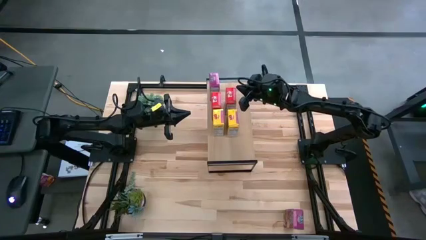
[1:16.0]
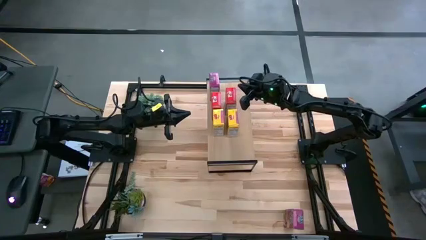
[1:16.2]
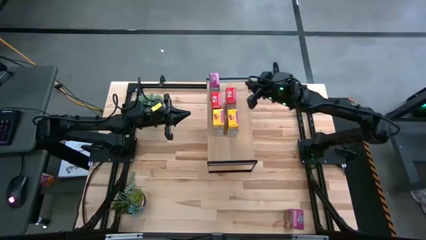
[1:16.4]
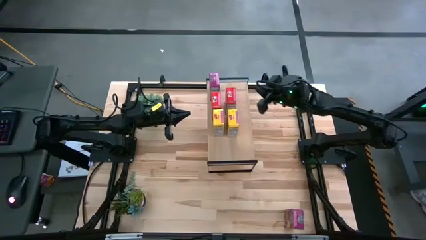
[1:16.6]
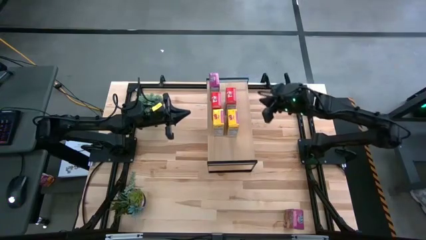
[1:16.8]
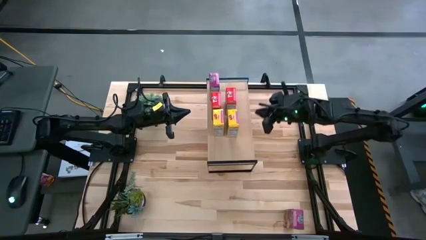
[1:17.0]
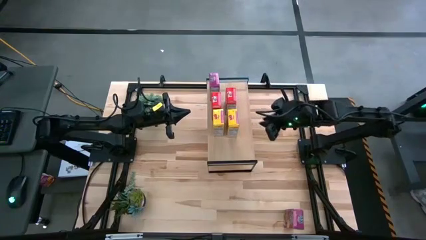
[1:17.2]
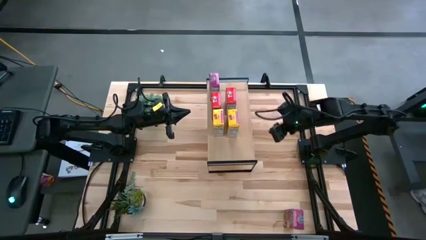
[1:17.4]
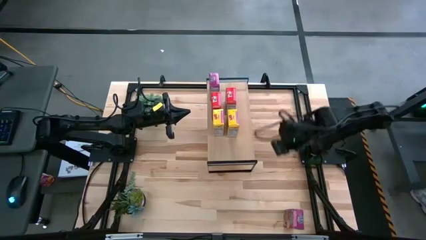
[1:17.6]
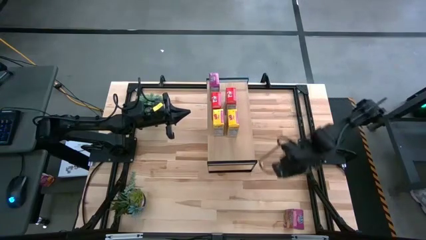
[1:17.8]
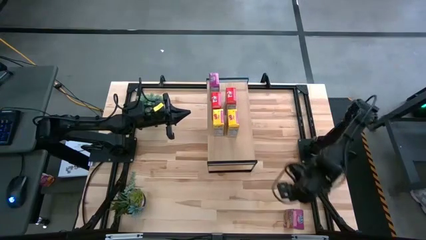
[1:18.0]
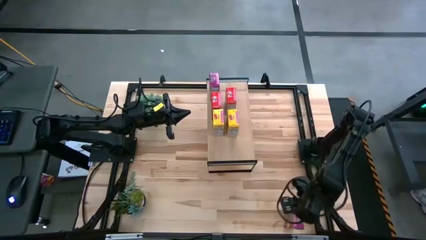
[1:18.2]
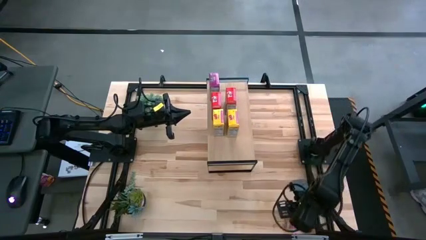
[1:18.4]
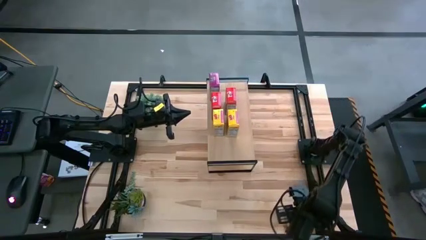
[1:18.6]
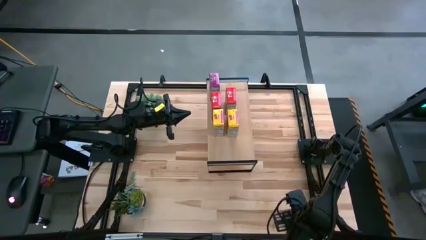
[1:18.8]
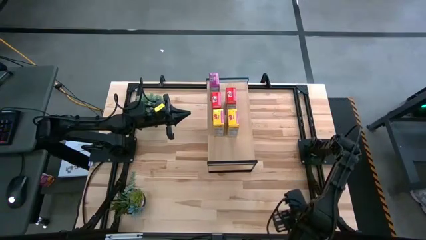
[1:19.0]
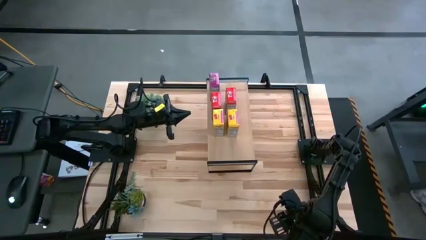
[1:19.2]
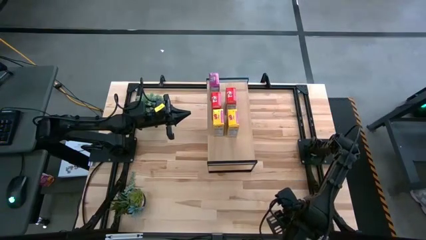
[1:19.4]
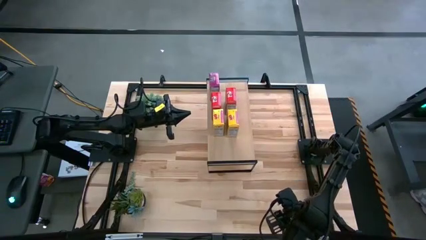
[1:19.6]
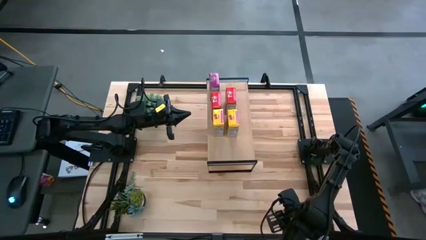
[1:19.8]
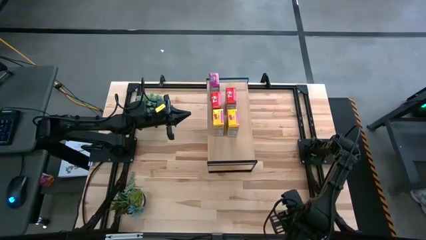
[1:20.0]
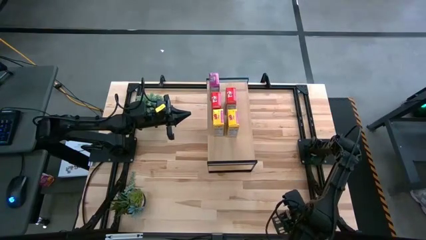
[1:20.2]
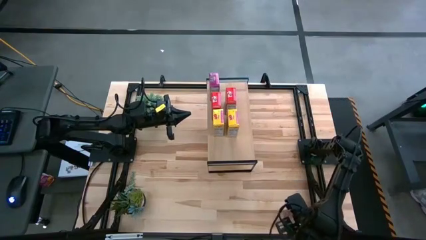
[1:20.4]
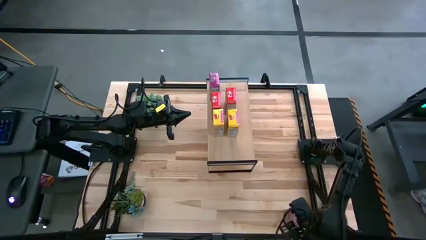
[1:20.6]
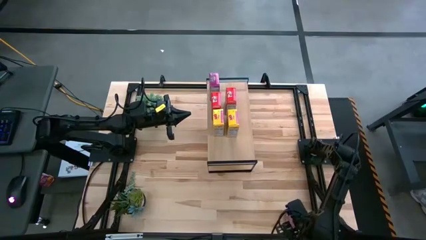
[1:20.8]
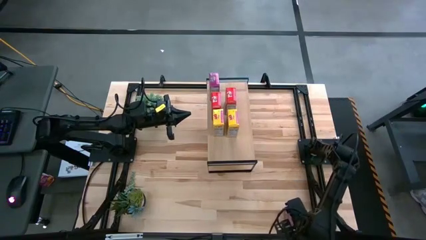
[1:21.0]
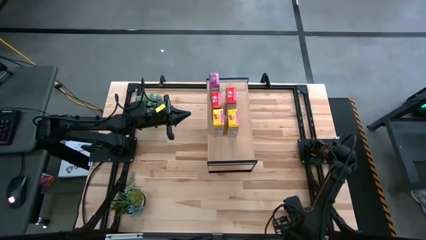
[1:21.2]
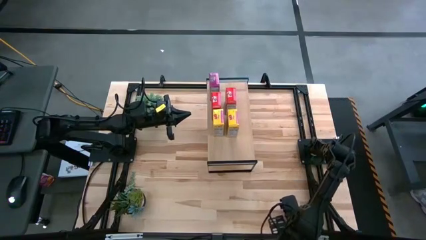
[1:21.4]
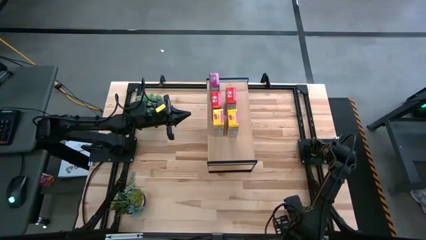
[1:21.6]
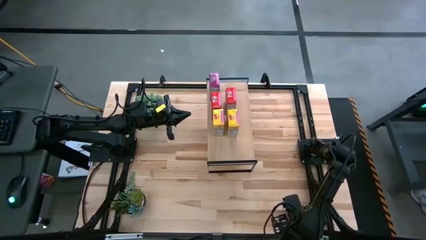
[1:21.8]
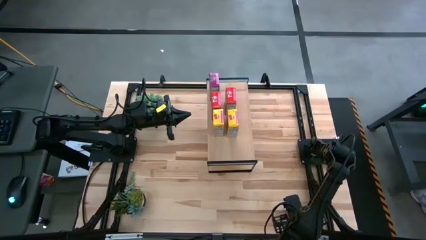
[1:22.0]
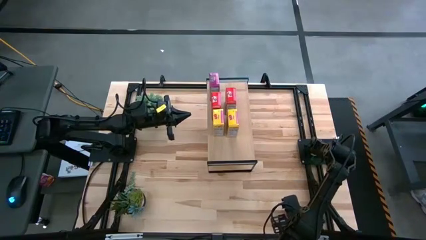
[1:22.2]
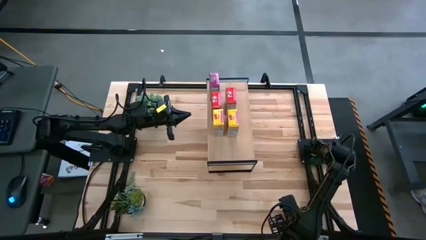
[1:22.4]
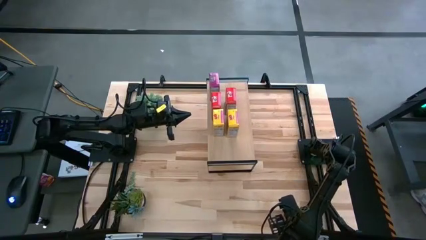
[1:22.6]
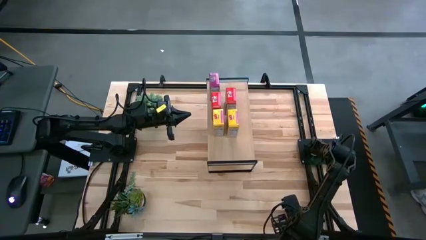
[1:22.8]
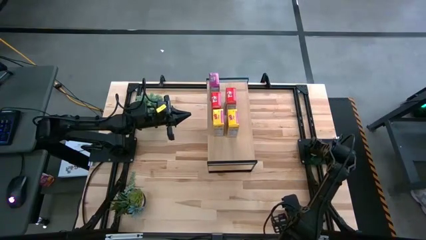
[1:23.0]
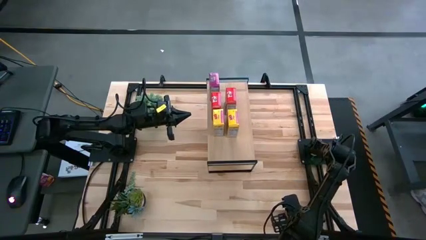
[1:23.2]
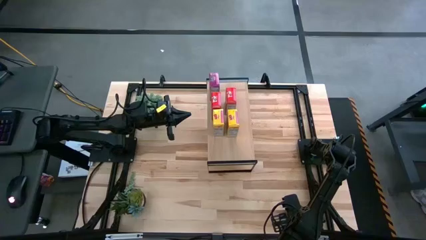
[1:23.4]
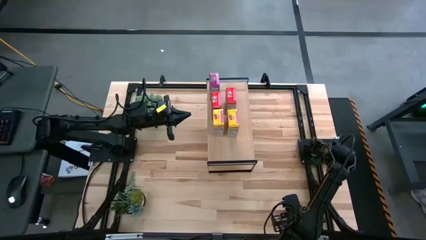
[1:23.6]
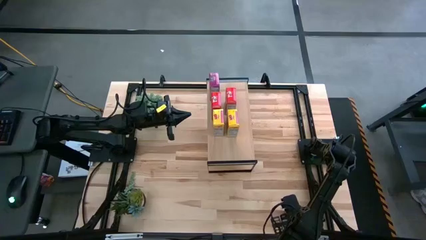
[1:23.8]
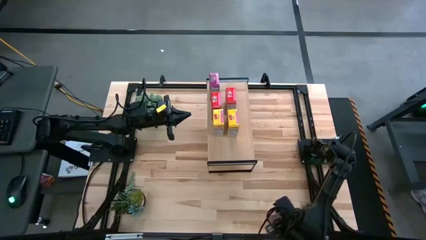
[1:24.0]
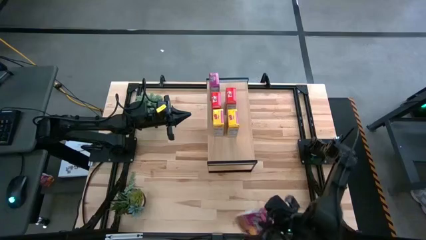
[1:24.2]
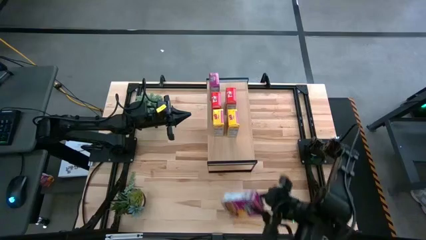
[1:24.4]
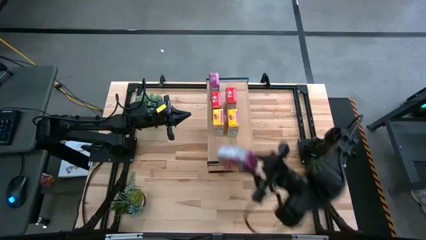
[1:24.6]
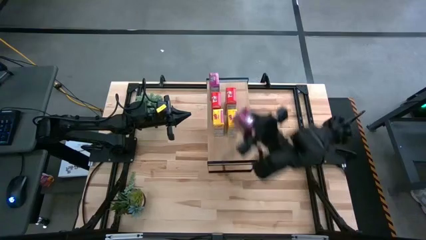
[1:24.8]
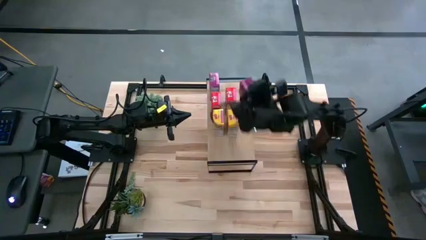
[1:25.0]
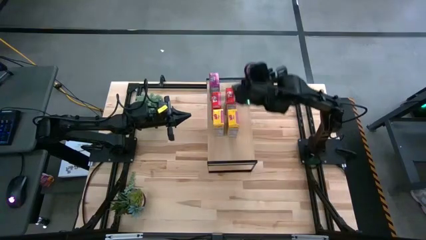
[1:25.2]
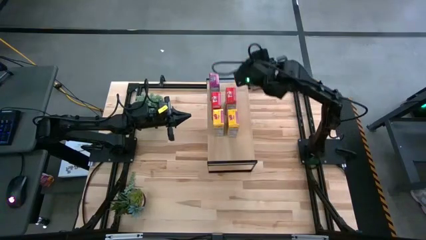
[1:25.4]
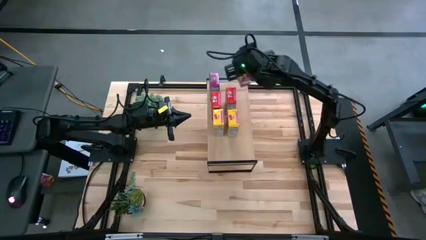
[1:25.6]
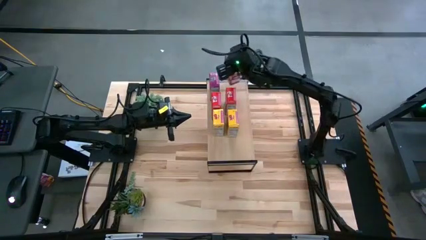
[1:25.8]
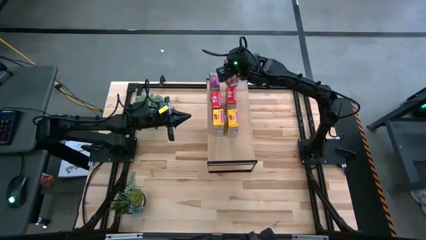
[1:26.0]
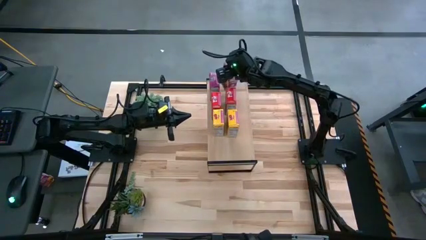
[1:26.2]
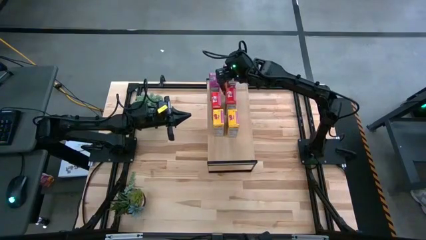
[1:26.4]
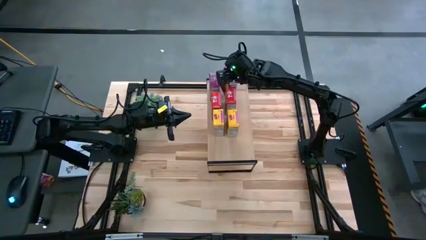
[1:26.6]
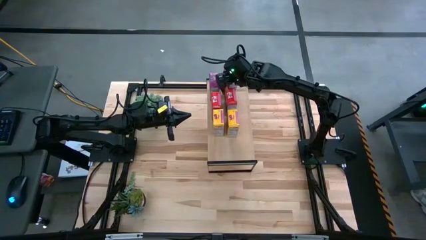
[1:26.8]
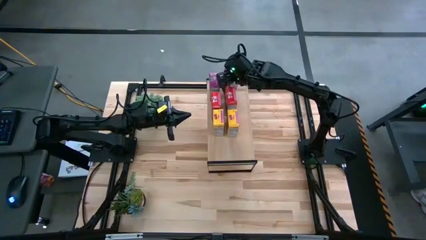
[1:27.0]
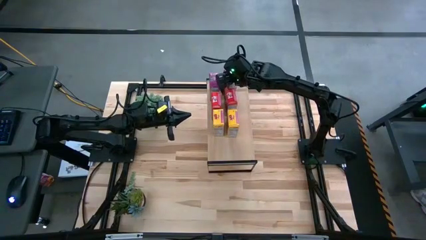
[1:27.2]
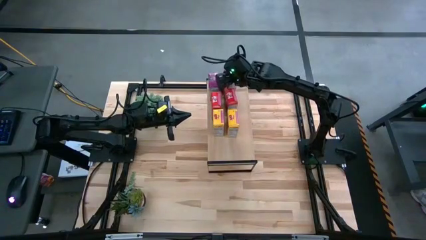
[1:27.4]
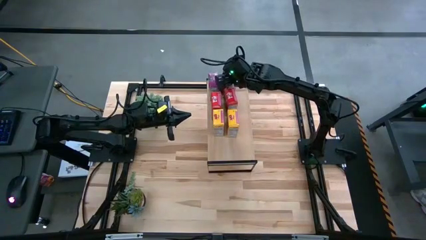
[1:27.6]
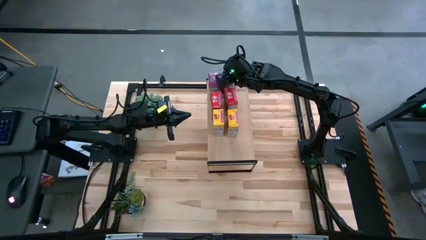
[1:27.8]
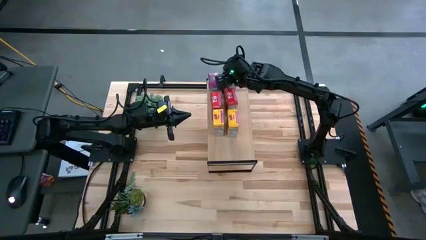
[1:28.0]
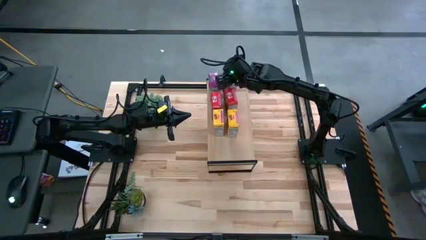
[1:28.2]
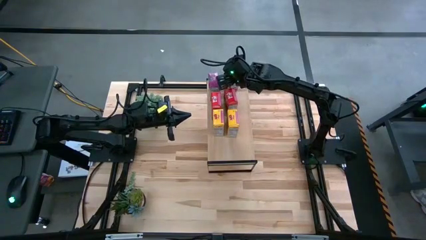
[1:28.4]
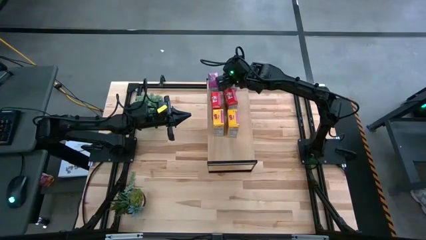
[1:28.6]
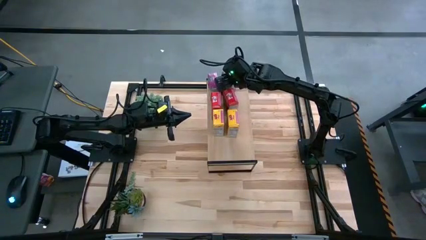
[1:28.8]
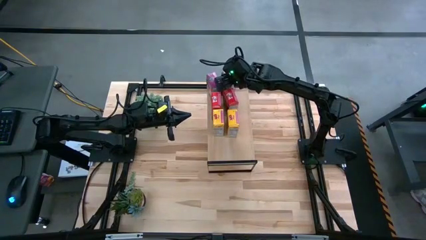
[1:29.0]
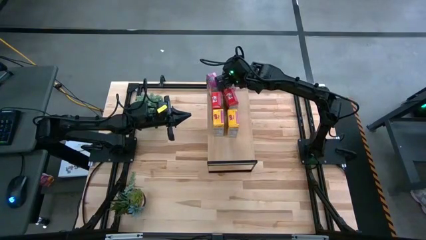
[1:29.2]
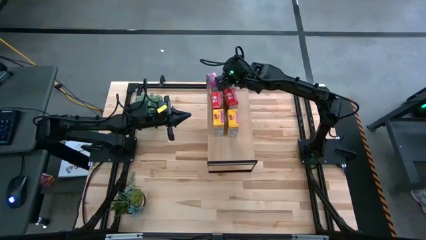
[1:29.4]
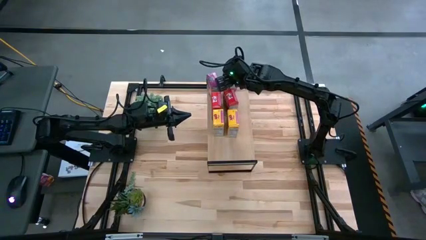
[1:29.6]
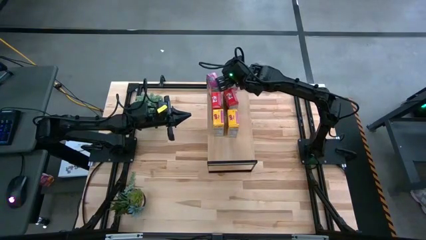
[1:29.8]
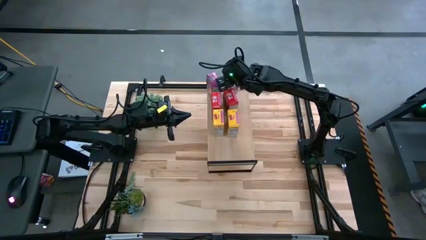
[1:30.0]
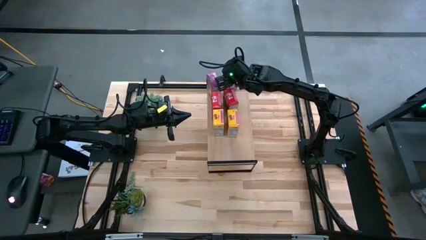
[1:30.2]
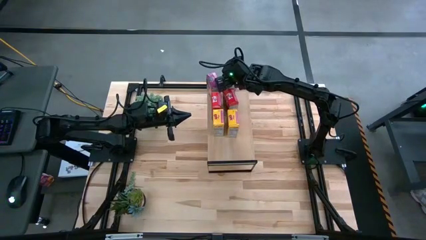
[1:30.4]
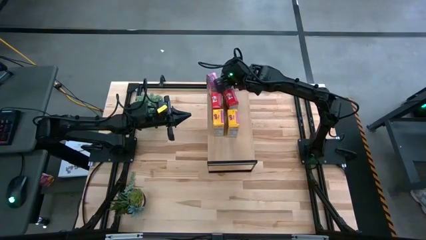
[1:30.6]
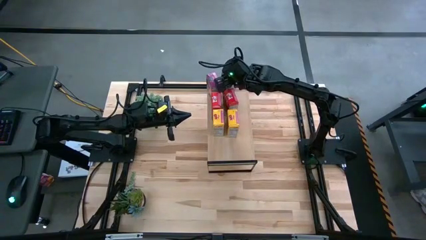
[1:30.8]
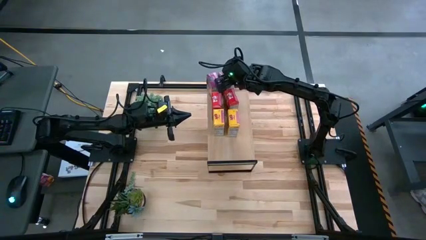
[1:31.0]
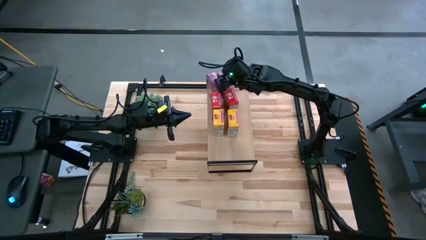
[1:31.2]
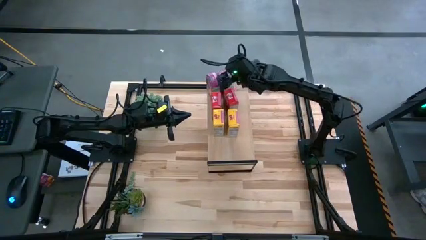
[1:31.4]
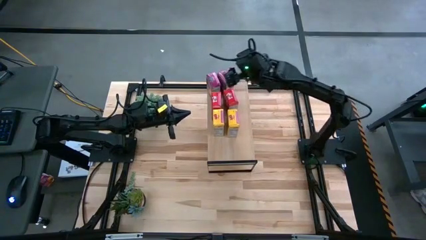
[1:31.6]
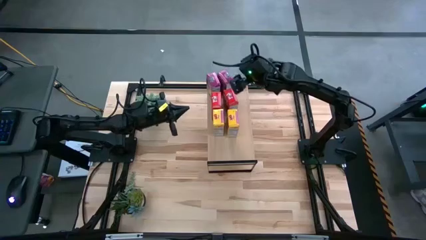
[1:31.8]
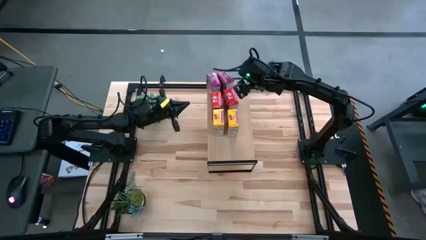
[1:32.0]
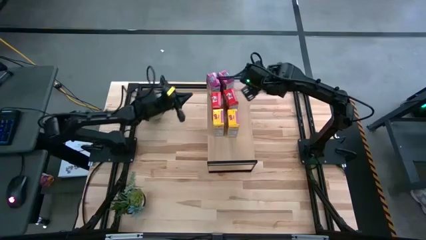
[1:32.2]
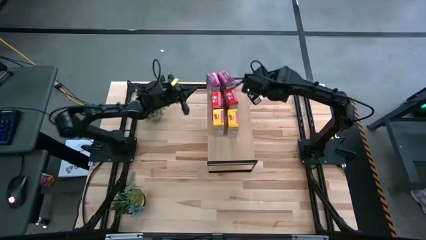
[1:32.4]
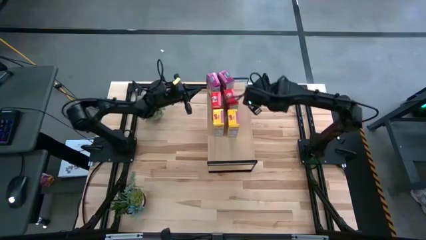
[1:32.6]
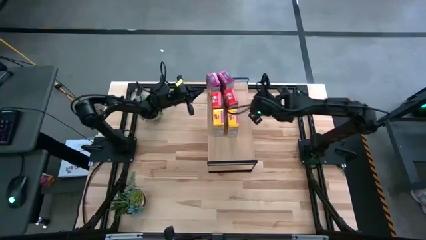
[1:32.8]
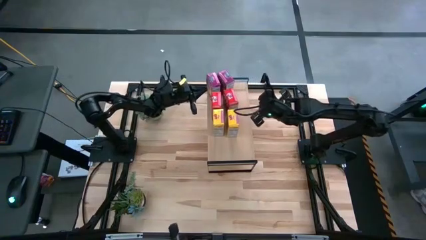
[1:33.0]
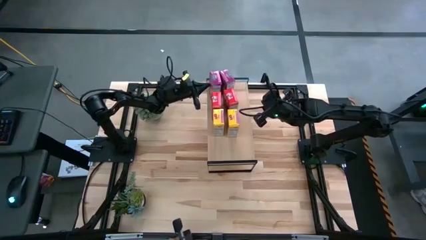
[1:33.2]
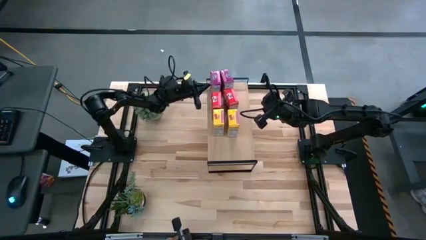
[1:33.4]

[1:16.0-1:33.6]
Task: Stack cereal on shelf
Put the violet cereal box aligned with the other violet cereal box on the shelf
